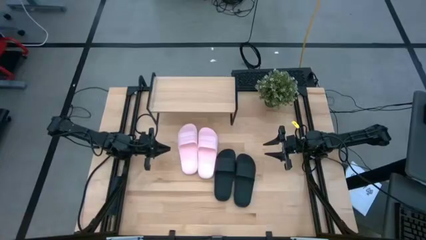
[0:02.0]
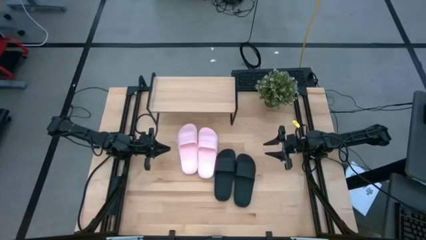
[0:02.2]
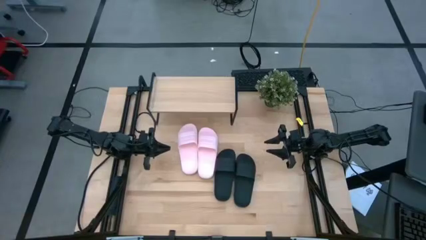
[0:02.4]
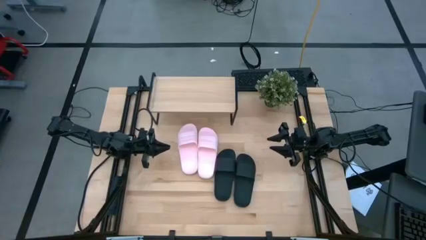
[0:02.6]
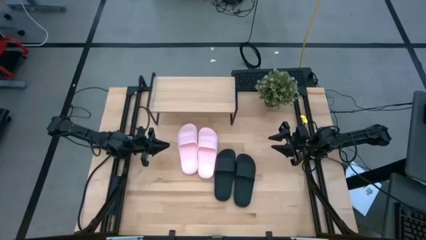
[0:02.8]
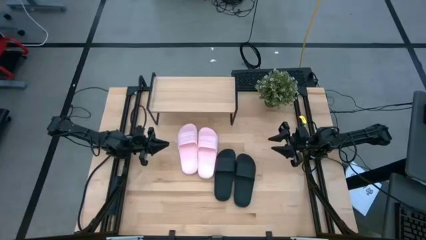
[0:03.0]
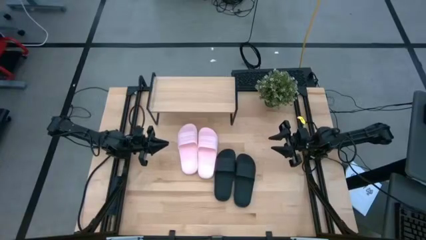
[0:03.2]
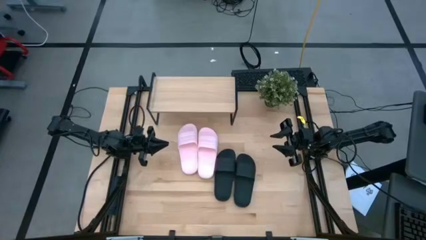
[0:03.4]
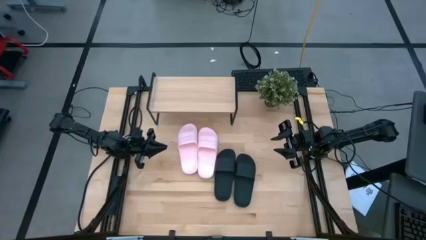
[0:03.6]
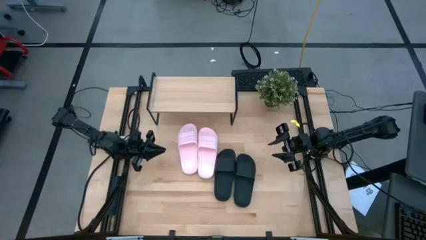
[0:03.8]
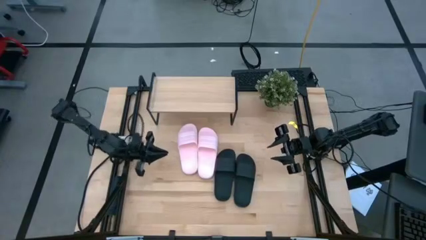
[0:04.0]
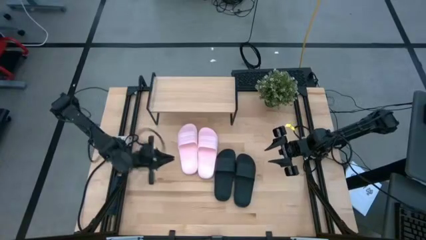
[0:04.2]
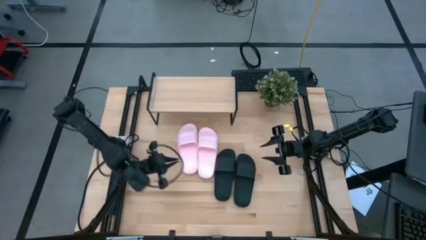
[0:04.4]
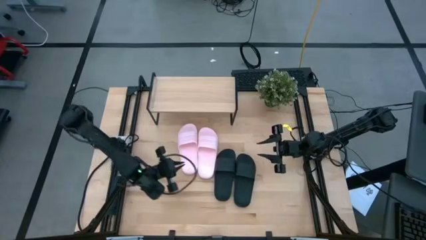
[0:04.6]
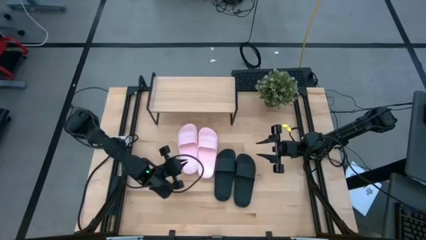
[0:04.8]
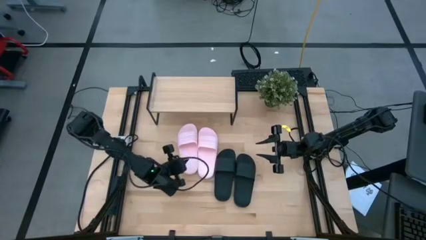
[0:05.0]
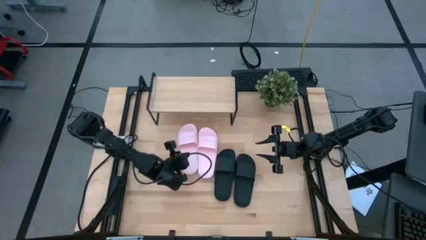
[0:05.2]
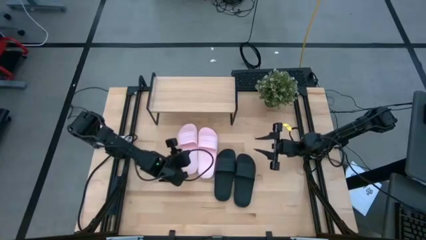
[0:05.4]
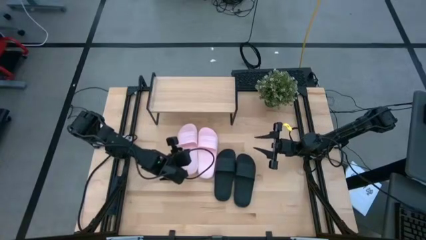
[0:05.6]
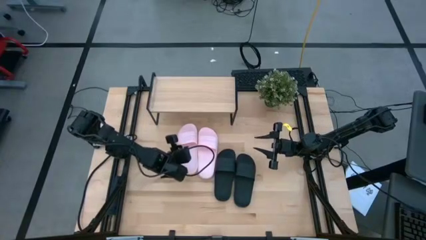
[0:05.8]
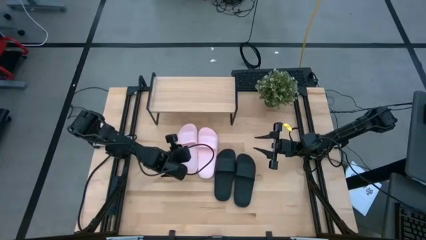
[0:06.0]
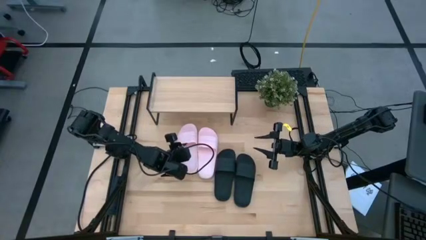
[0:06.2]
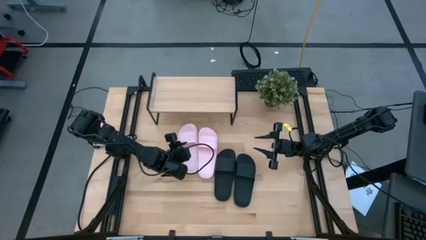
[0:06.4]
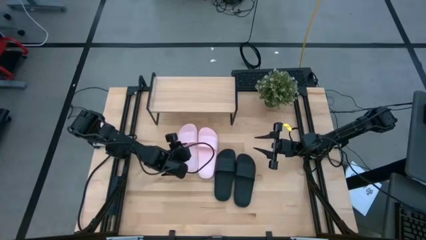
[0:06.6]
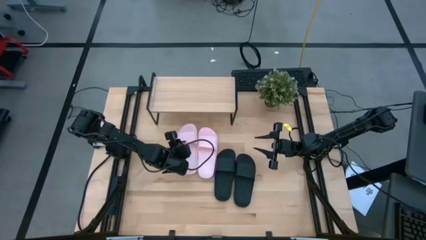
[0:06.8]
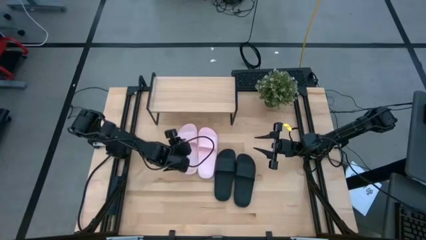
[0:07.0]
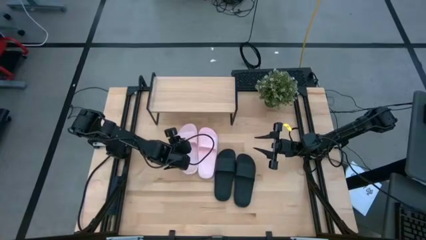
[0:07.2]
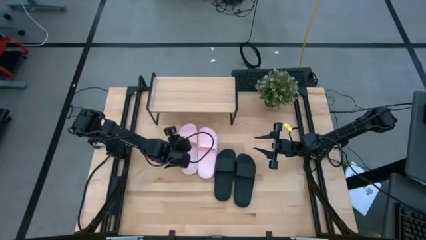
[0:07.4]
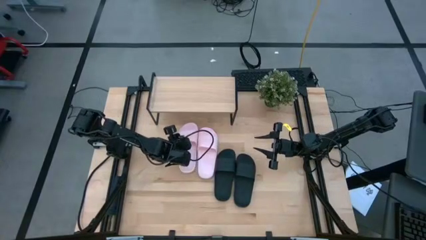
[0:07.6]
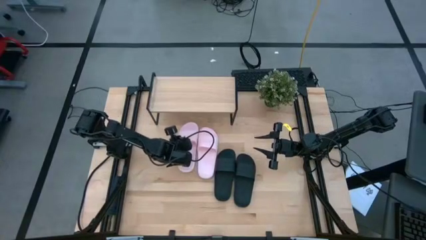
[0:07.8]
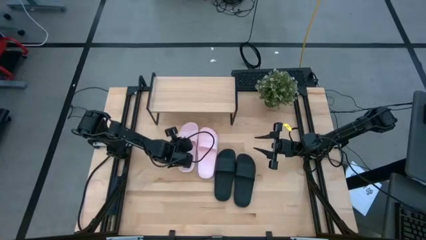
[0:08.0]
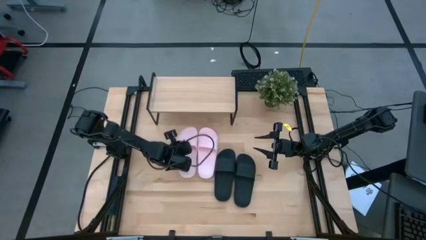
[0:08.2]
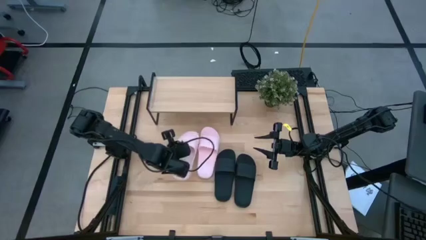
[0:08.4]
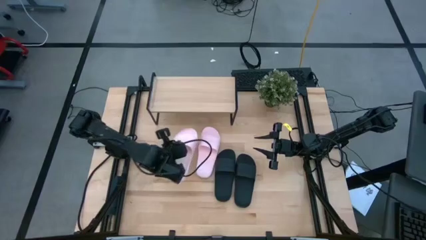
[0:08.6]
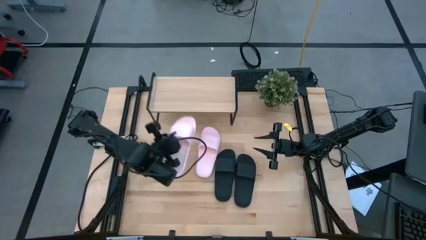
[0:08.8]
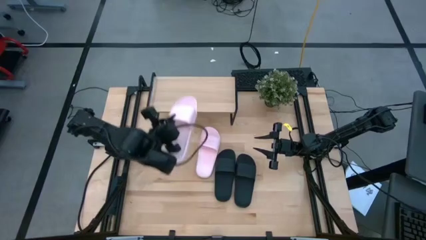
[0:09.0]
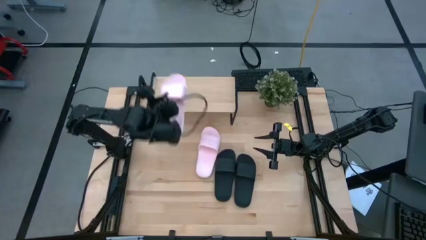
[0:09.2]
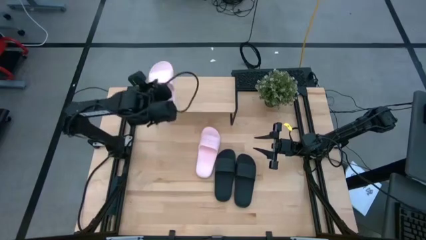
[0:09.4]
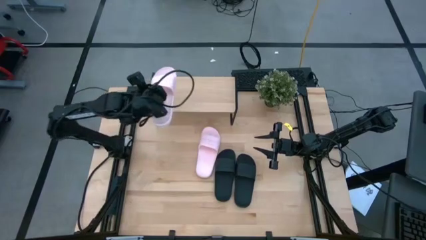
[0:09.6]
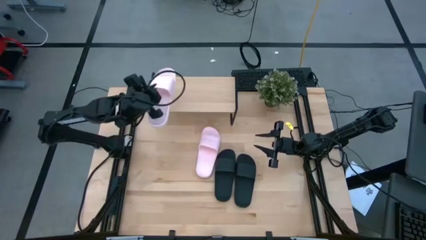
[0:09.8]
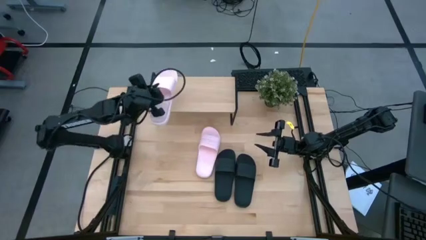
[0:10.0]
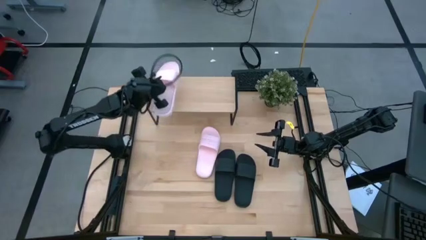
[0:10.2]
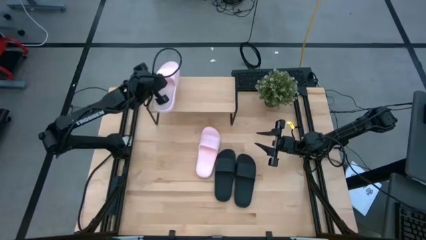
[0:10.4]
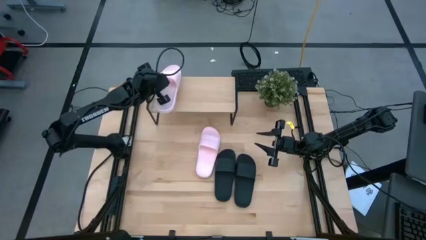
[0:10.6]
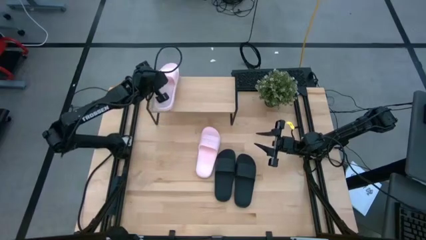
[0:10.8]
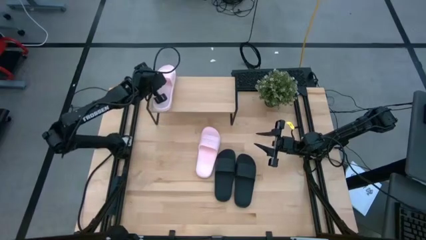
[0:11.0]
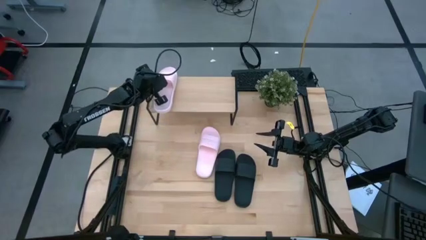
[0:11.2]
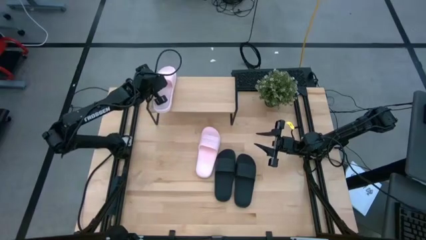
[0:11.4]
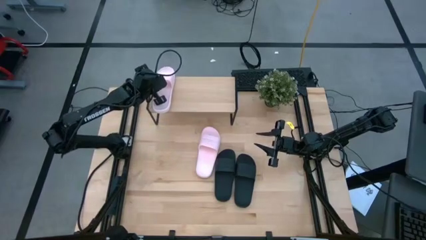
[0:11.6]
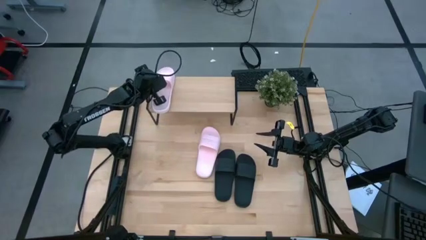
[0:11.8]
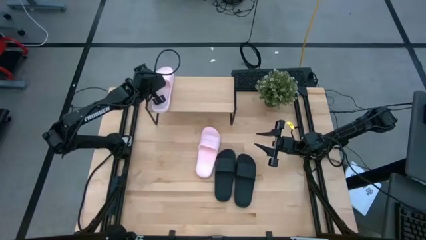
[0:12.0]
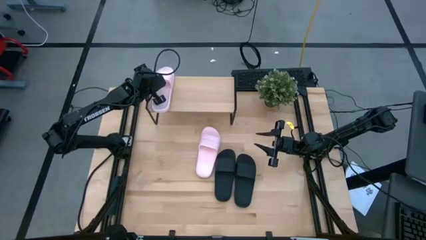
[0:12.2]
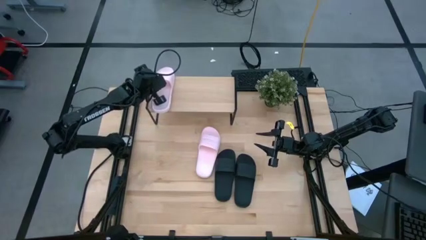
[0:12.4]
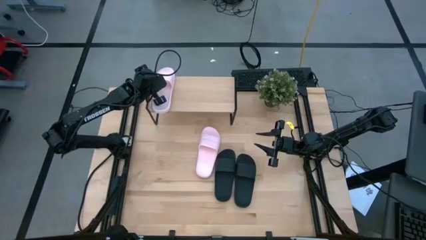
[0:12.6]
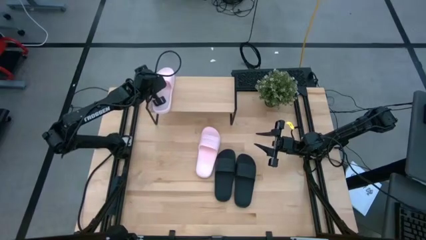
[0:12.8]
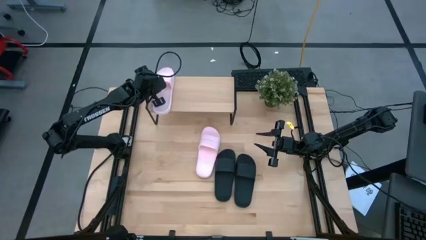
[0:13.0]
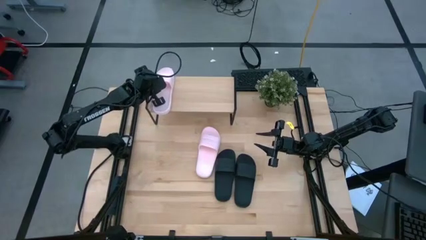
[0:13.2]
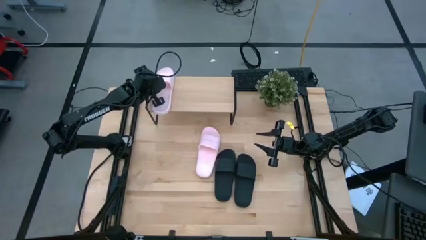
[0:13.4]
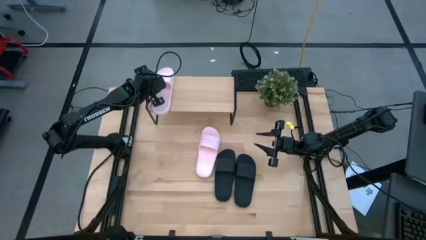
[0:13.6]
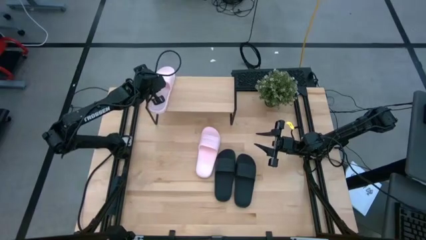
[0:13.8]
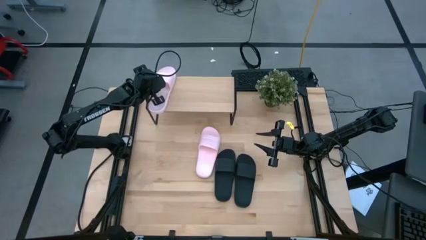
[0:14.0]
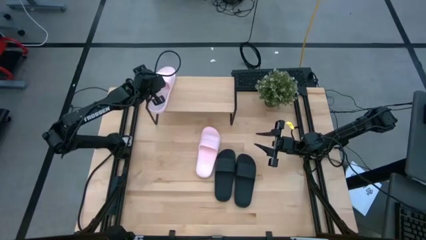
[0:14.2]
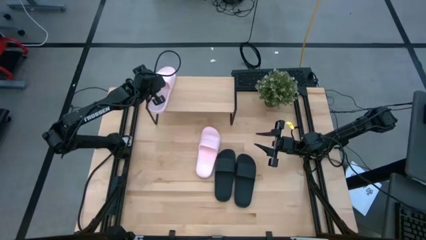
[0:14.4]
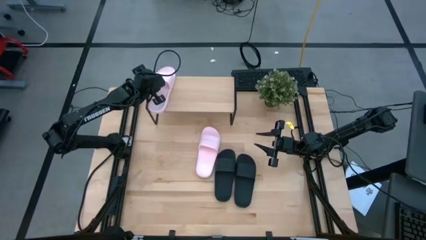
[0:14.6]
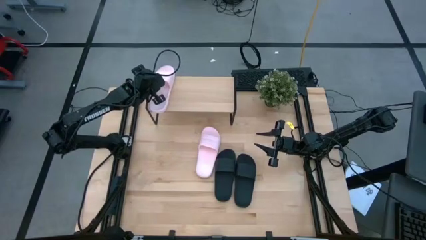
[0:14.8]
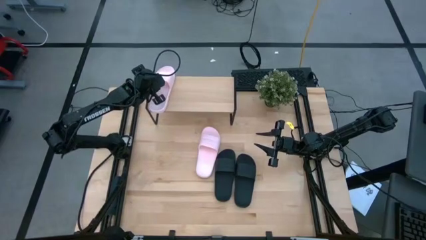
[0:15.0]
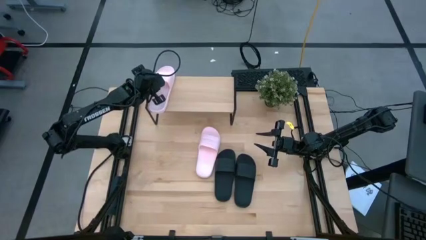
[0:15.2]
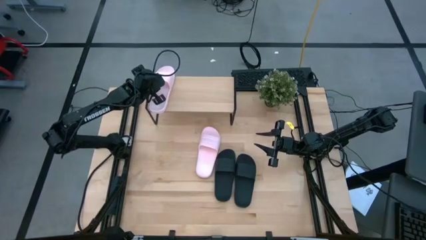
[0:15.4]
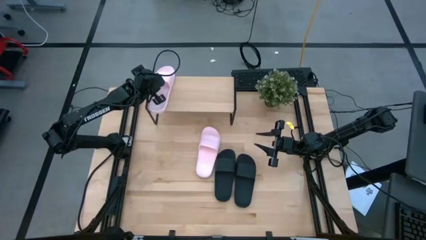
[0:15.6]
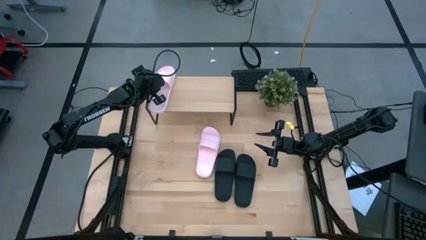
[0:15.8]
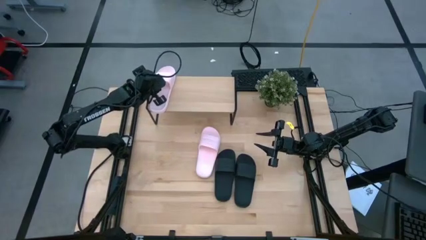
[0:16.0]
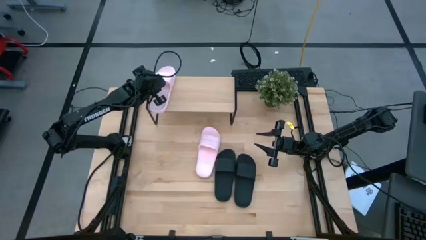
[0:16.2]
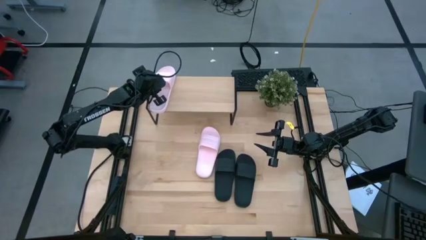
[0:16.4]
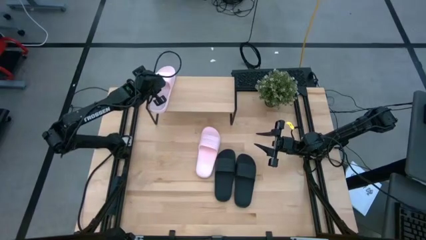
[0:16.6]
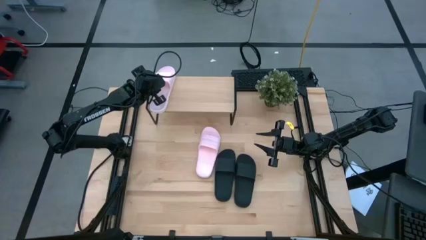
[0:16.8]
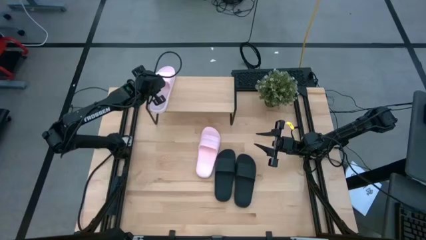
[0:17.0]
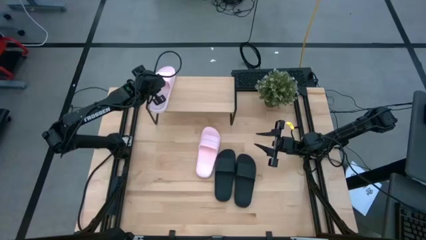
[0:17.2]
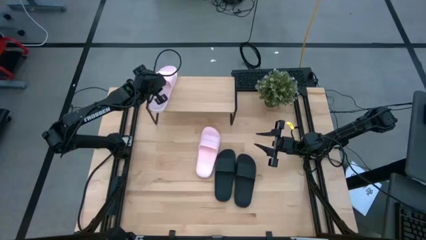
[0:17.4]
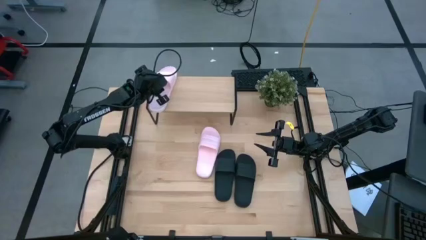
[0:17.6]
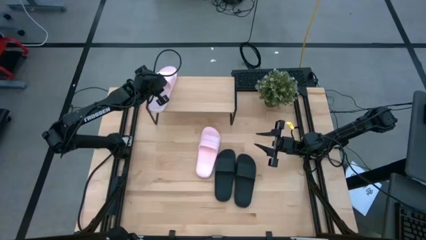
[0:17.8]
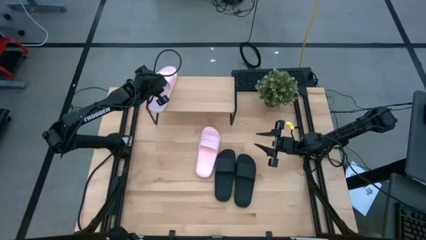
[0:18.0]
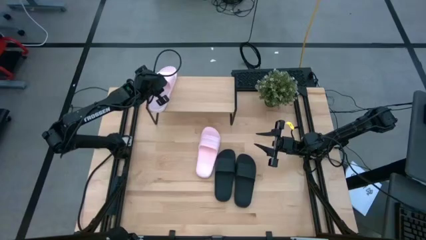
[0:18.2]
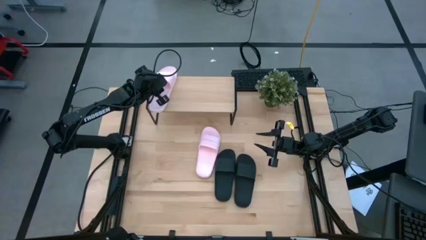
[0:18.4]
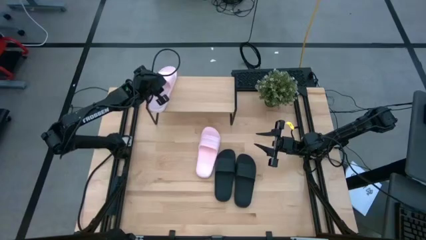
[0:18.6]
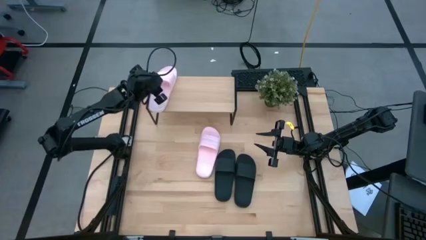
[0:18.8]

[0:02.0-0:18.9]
Task: Pick and place slides into the shelf
Put the left pink slide on the shelf
